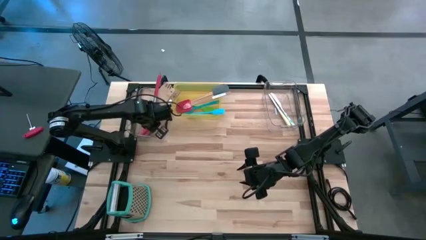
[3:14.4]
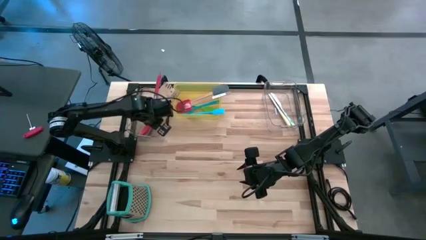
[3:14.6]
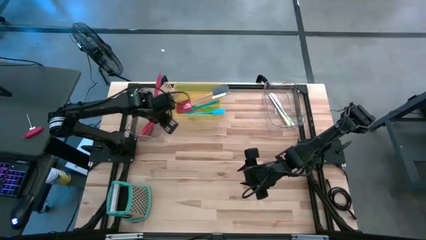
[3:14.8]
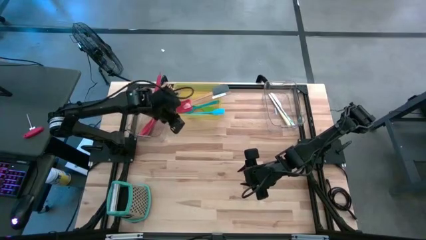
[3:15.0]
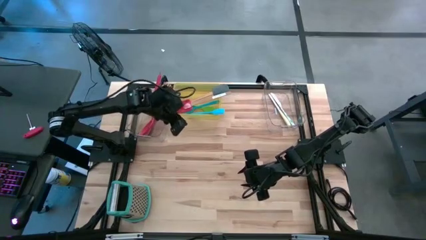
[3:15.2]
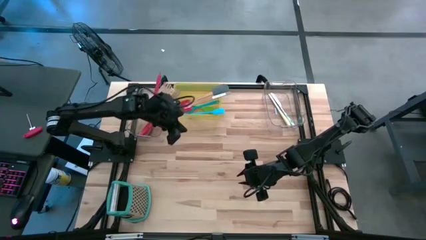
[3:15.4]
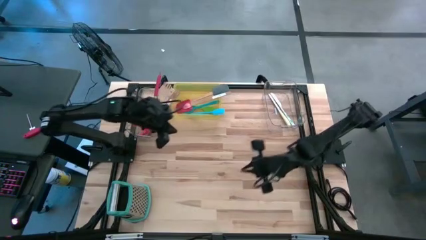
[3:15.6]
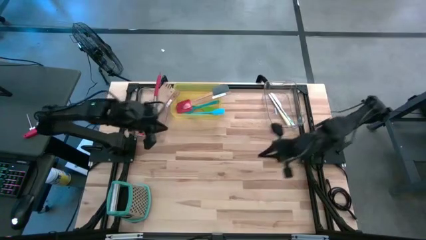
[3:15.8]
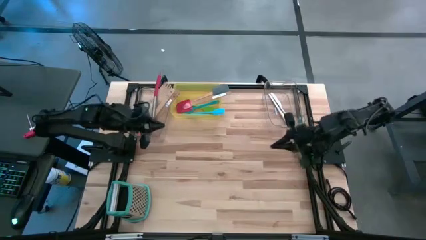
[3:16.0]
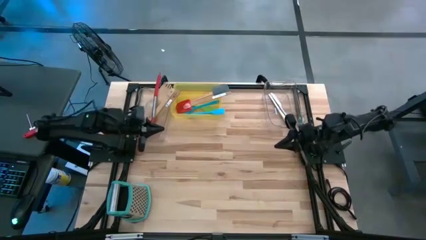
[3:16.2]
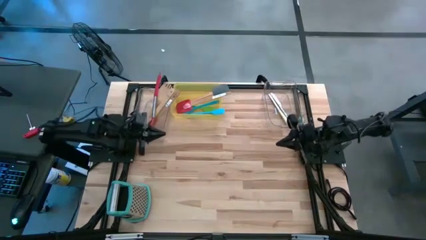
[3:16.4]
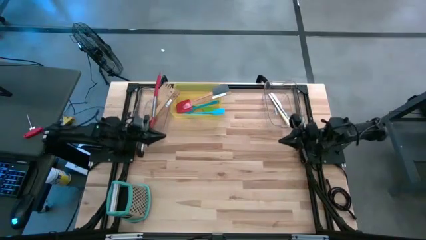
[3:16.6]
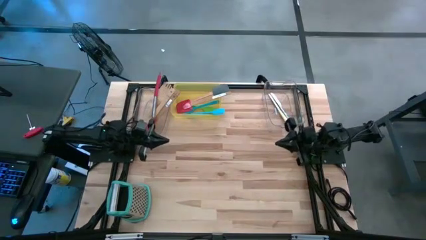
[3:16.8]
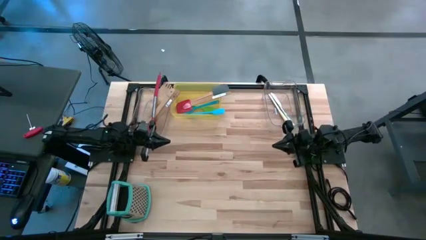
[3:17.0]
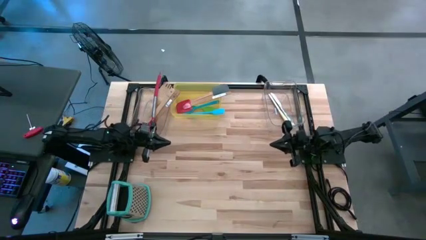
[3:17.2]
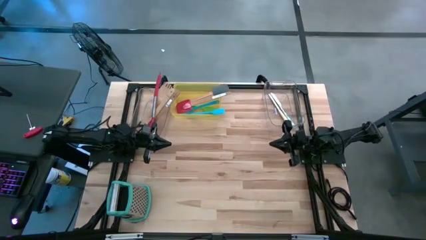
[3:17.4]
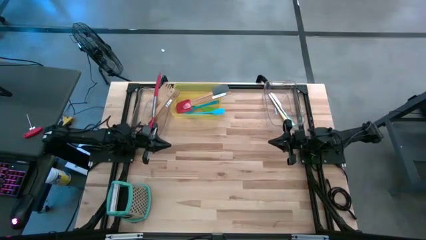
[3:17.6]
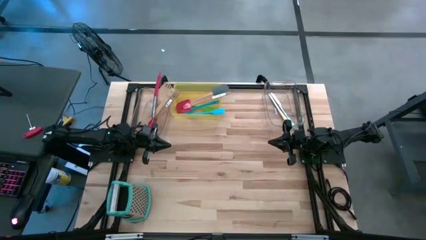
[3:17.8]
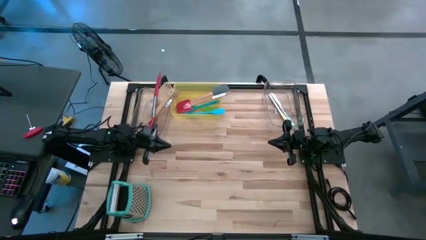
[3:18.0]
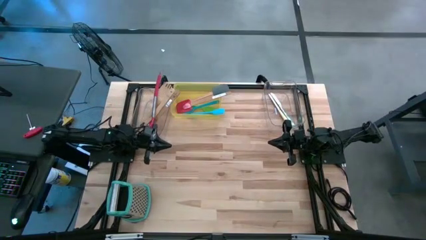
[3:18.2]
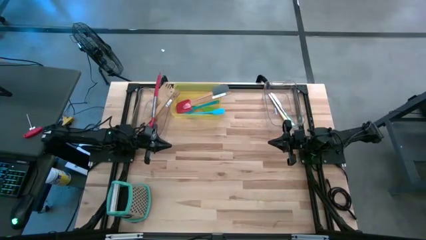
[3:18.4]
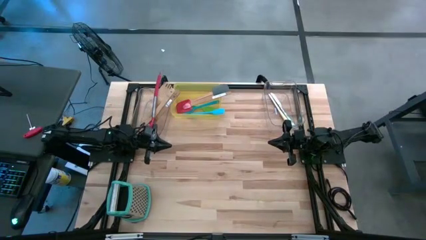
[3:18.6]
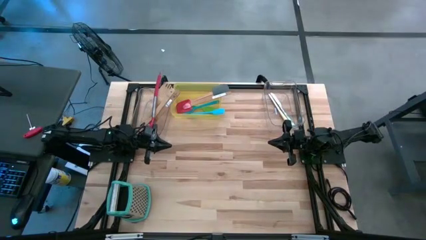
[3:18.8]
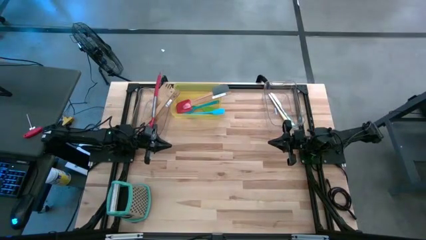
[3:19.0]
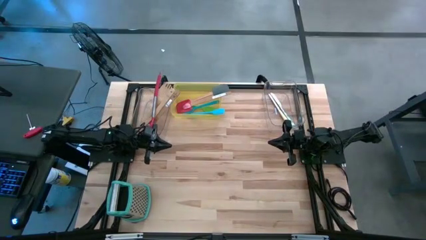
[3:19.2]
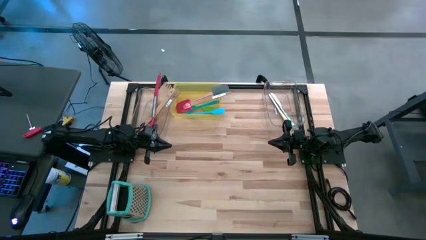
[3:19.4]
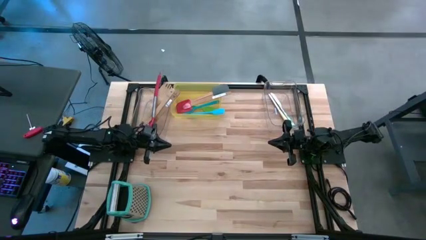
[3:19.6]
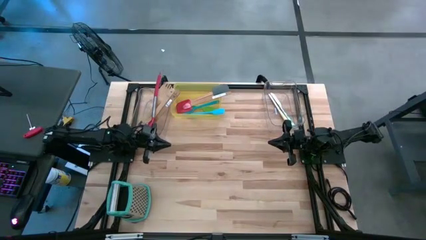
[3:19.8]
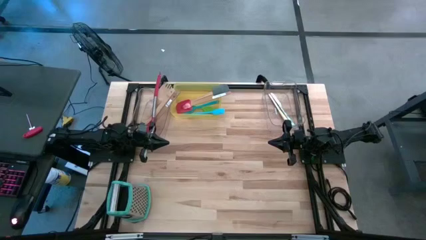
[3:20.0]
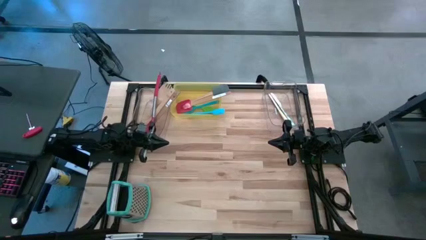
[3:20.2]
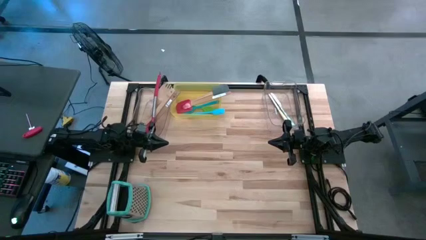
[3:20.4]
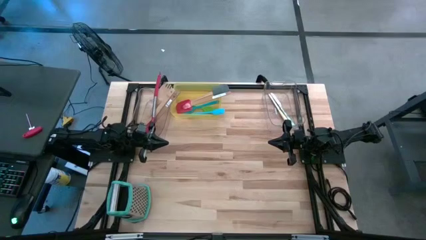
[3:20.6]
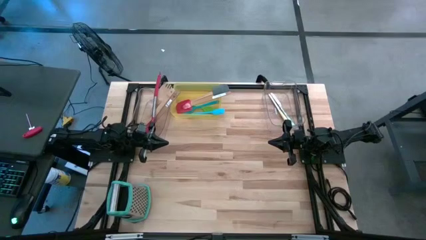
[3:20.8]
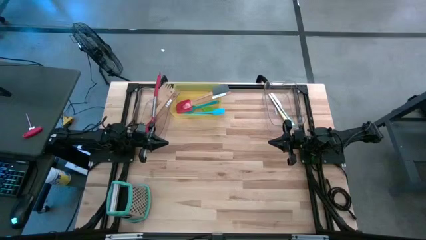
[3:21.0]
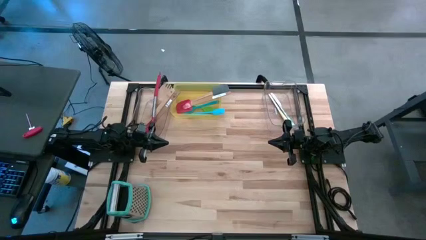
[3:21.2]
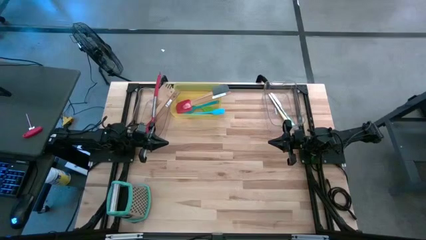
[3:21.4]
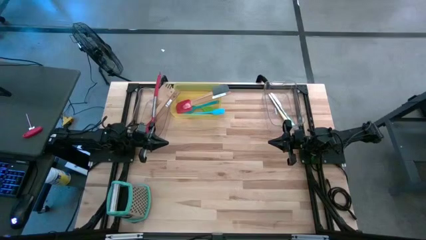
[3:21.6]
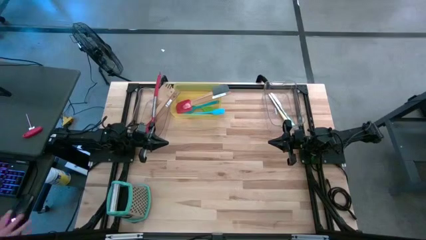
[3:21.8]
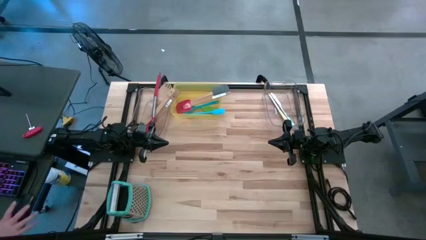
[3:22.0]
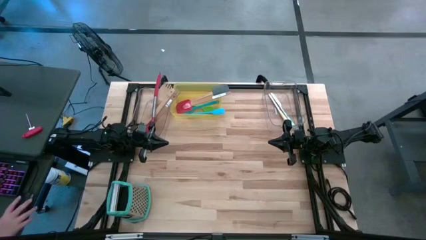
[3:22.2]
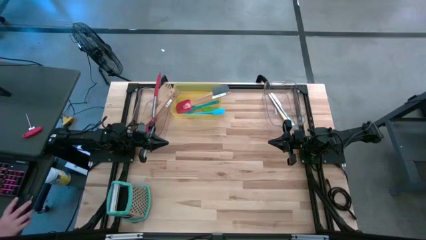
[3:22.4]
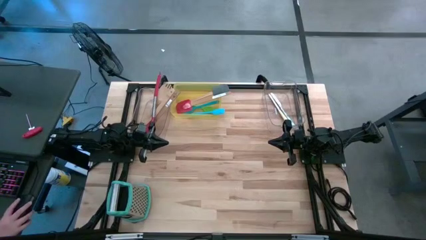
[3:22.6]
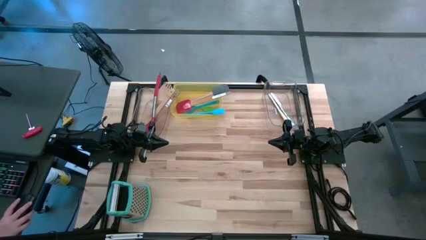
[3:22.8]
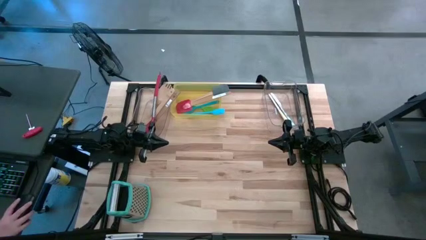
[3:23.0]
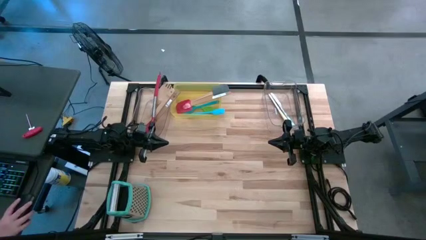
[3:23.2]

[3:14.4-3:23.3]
Task: Pick & Place Kitchen Items
Return to Home Position

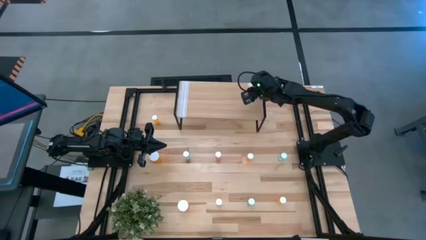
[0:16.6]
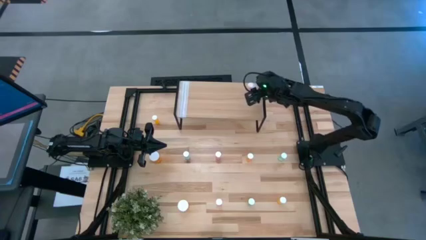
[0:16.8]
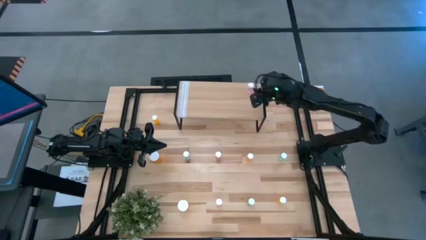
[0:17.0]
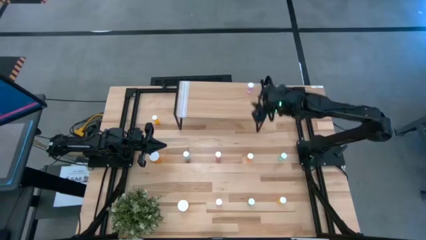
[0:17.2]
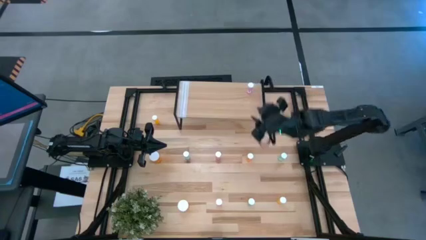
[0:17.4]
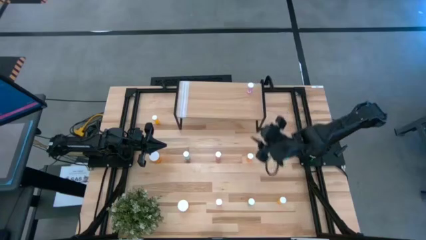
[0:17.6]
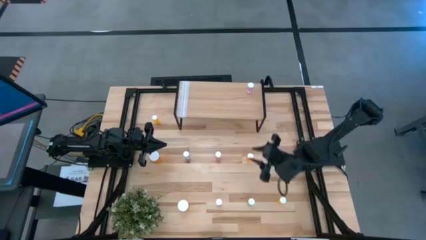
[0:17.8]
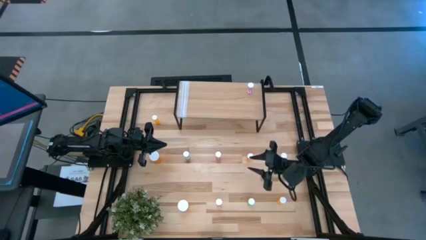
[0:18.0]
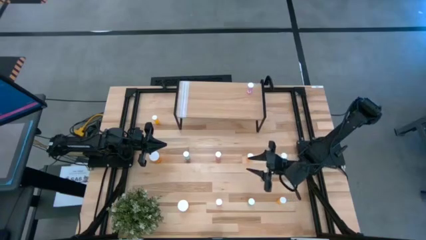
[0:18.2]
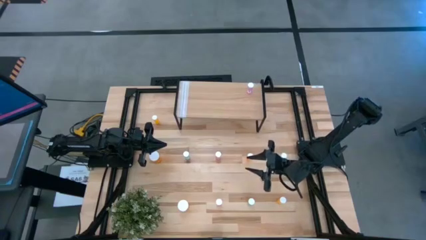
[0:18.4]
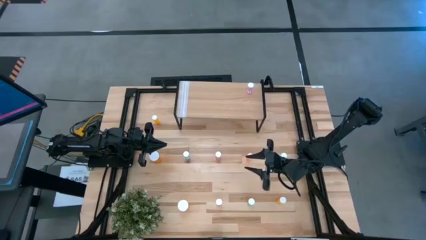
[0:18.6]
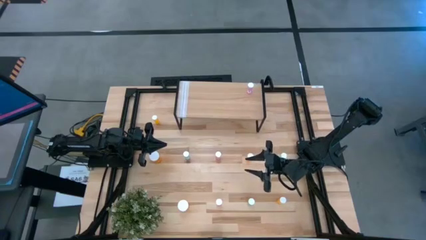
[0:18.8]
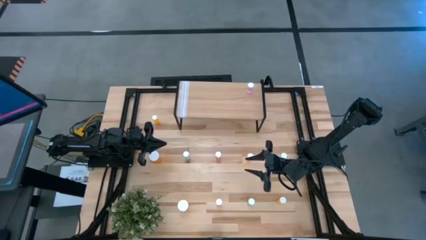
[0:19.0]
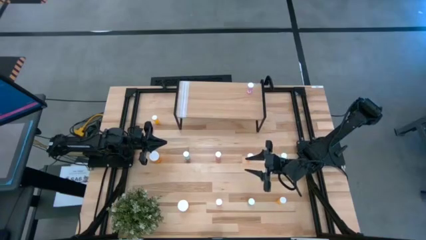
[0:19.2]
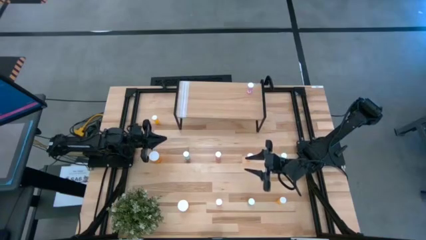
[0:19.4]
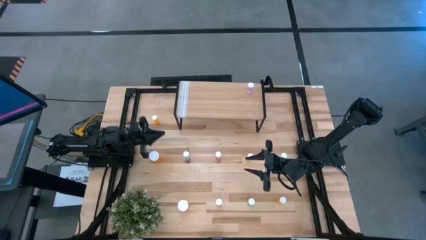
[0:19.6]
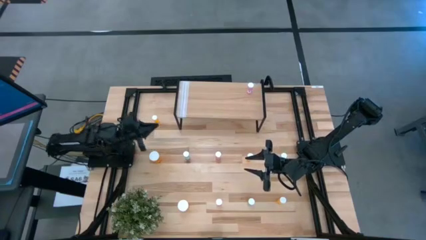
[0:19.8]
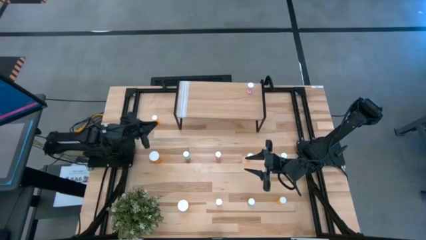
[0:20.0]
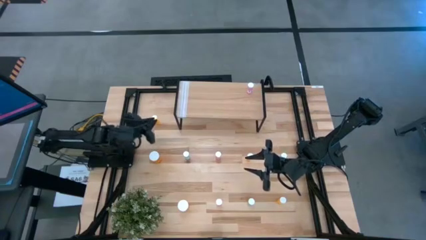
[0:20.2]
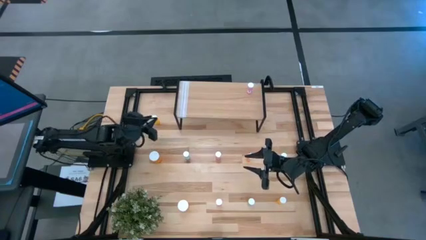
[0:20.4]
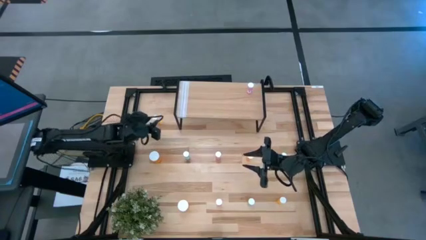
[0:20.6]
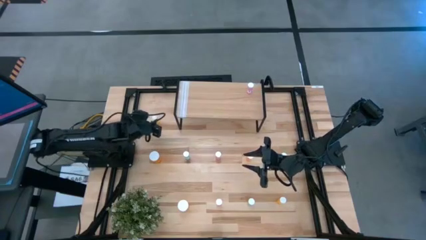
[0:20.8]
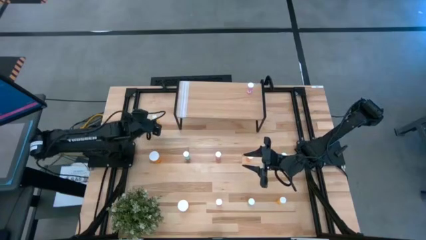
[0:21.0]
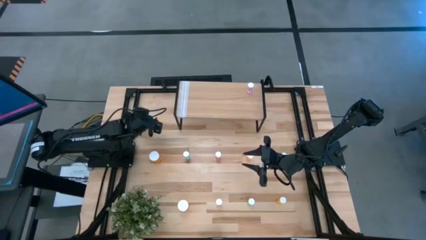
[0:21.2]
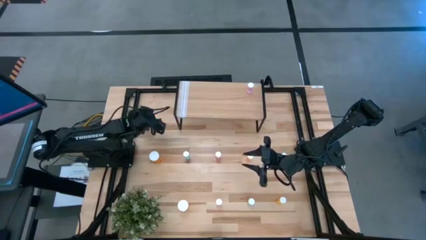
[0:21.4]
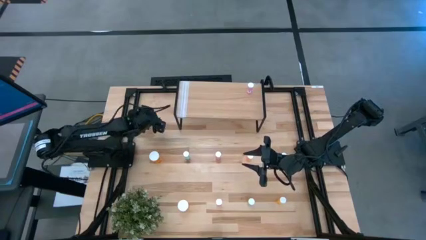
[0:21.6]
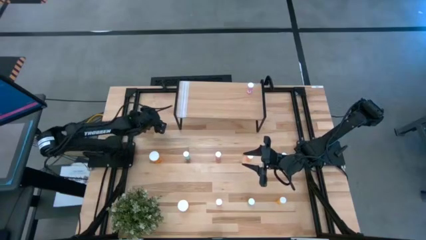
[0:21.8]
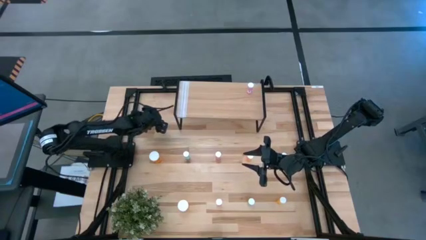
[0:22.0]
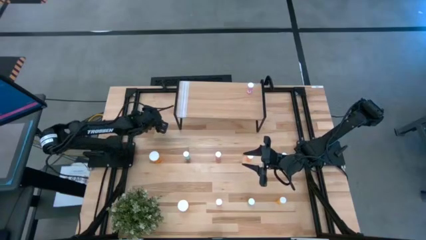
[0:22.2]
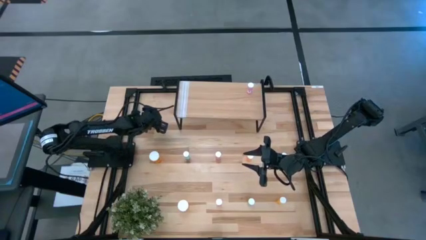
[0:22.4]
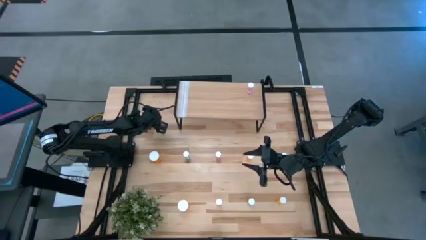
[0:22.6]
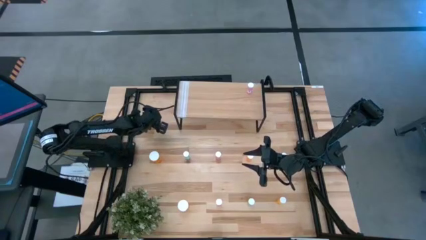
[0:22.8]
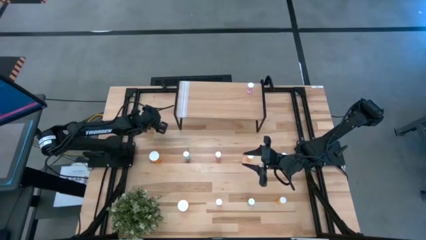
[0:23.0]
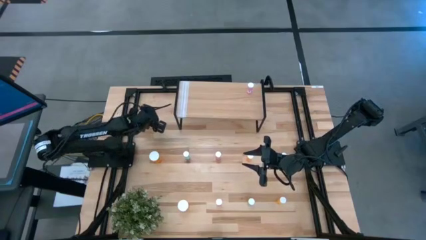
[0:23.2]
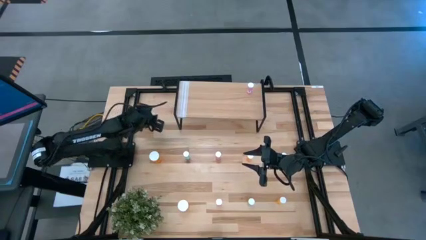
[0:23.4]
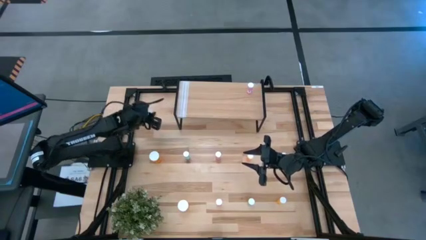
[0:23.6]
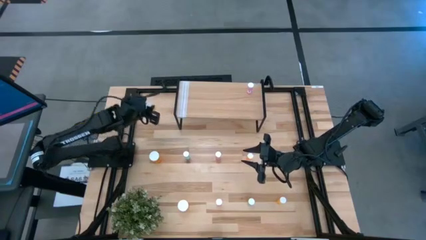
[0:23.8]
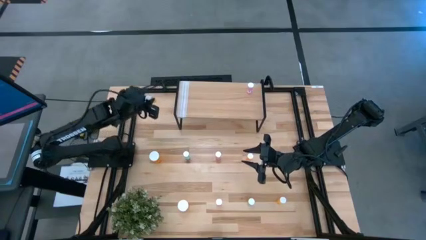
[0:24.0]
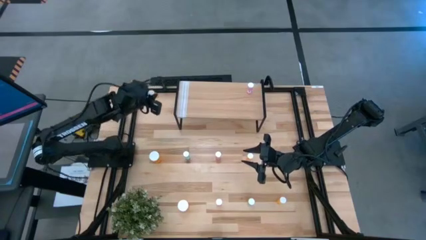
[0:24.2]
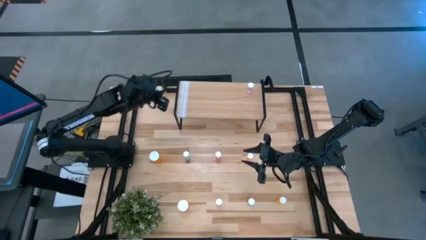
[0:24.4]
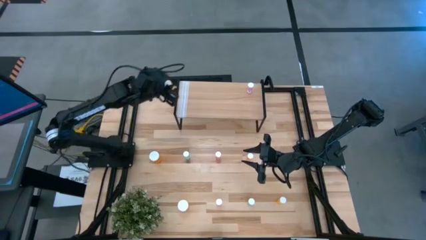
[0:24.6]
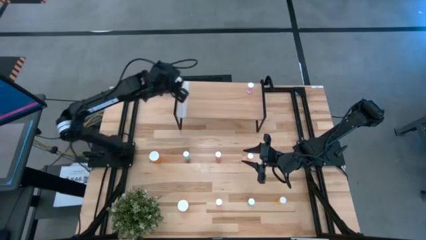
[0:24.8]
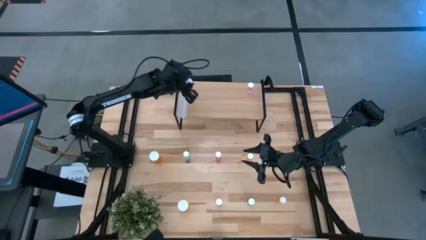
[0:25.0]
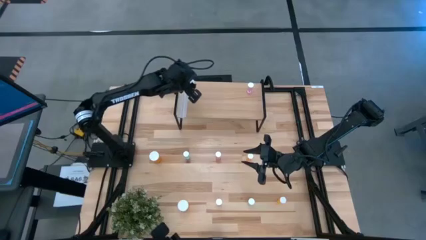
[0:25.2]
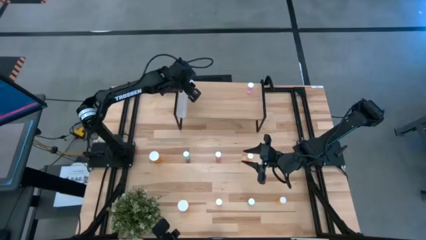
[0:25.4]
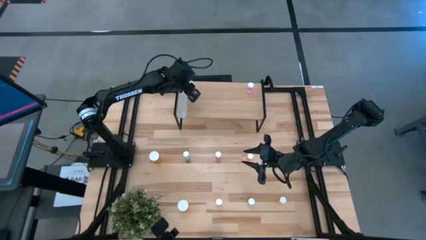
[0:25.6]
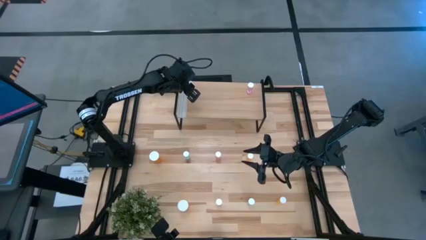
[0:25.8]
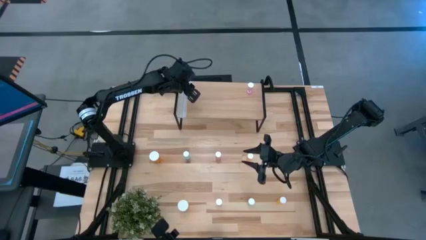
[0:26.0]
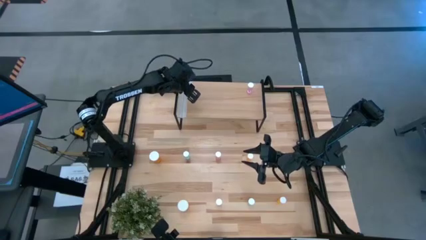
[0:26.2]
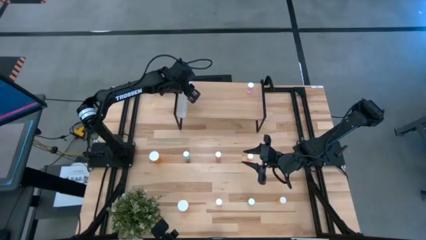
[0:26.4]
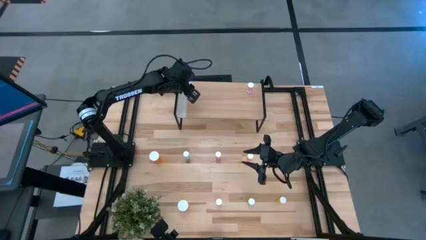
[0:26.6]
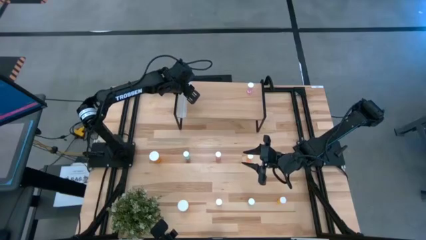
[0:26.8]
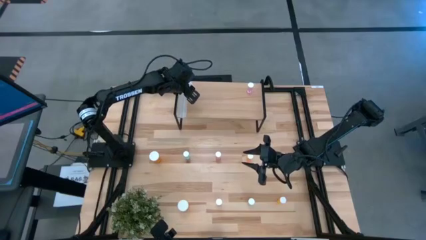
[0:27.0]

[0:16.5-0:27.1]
Task: Pick and place medicine bottles onto shelf by color
Put the top left orange small pill bottle on the shelf
